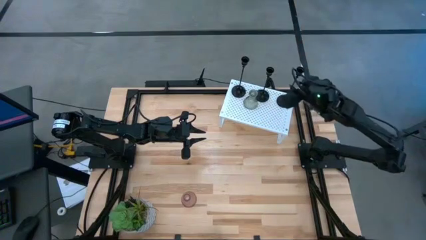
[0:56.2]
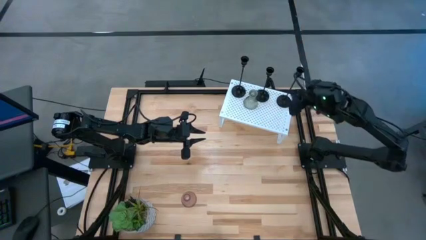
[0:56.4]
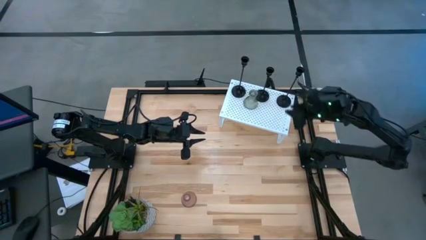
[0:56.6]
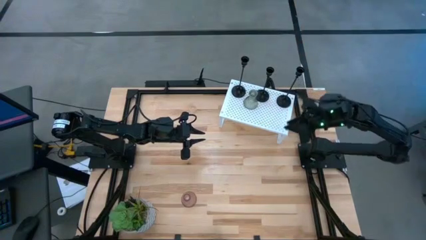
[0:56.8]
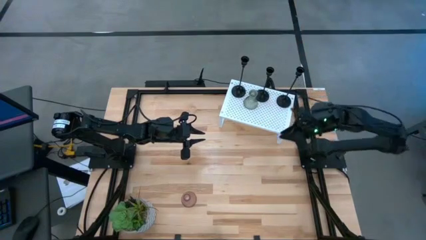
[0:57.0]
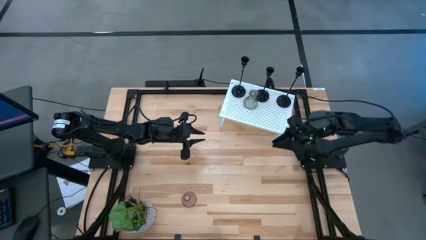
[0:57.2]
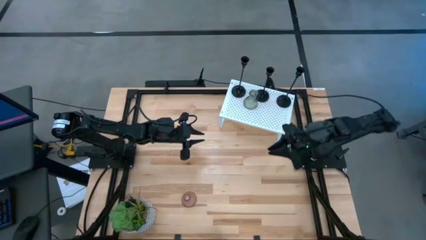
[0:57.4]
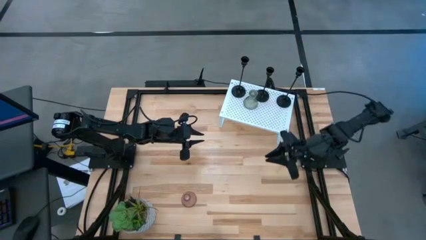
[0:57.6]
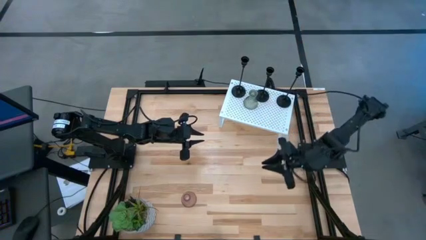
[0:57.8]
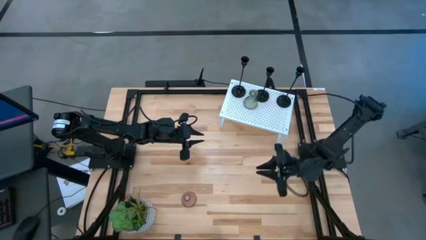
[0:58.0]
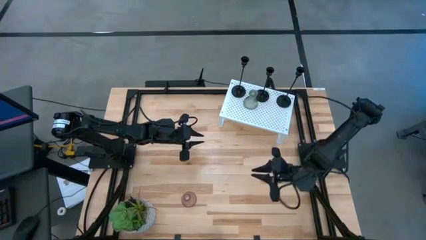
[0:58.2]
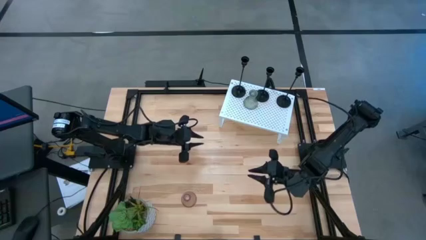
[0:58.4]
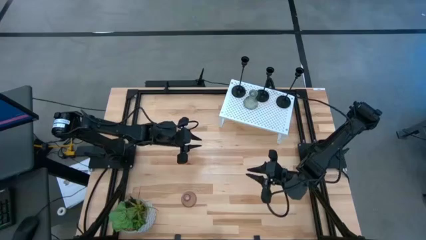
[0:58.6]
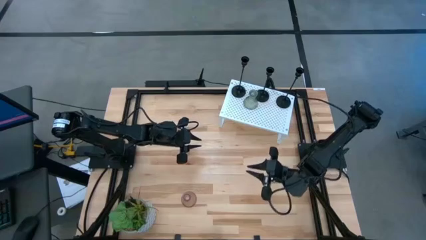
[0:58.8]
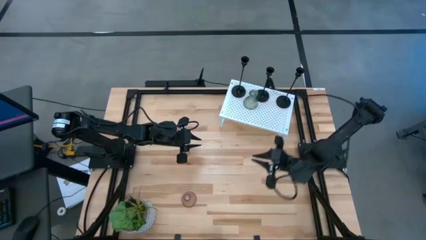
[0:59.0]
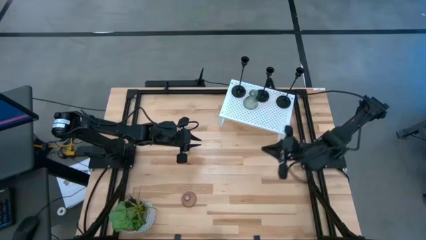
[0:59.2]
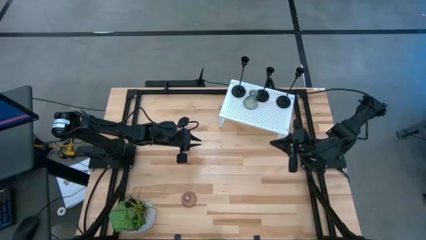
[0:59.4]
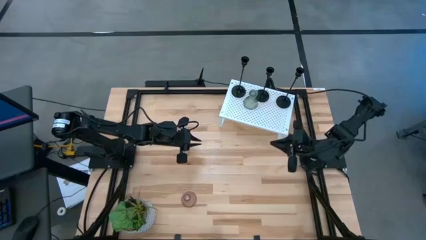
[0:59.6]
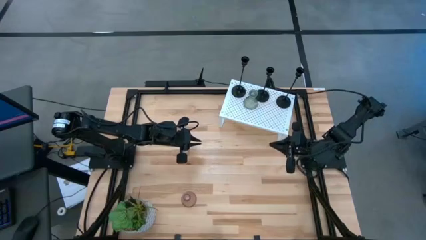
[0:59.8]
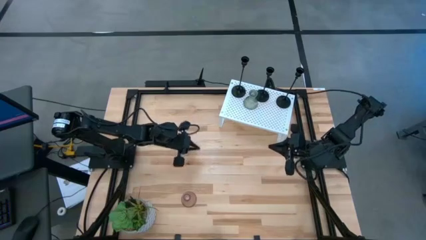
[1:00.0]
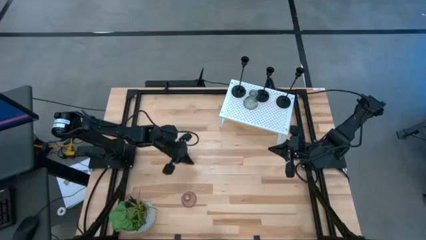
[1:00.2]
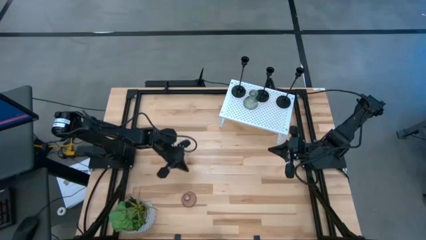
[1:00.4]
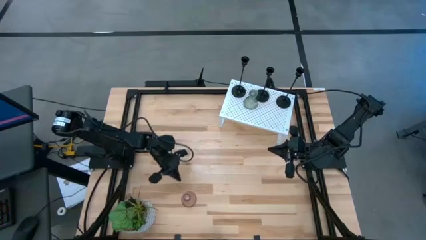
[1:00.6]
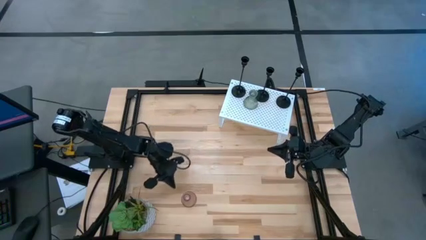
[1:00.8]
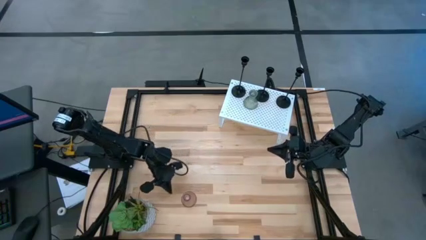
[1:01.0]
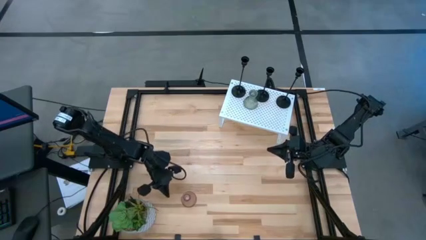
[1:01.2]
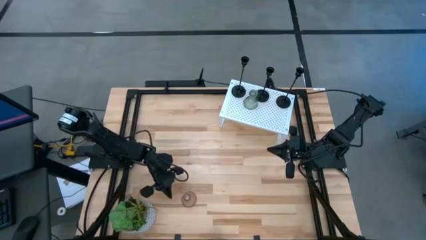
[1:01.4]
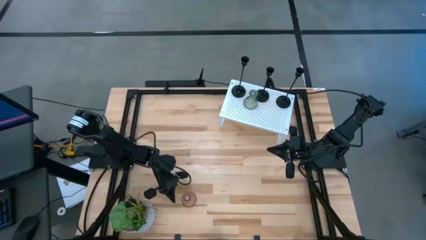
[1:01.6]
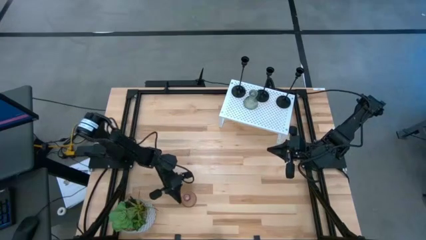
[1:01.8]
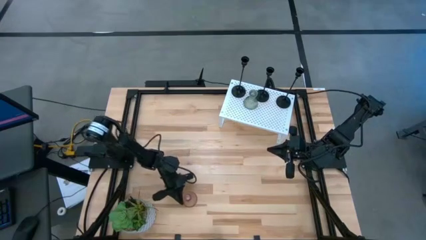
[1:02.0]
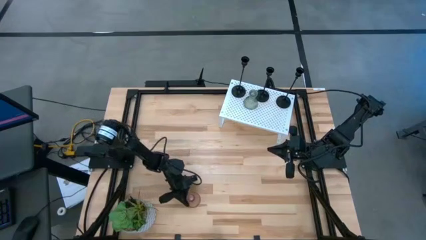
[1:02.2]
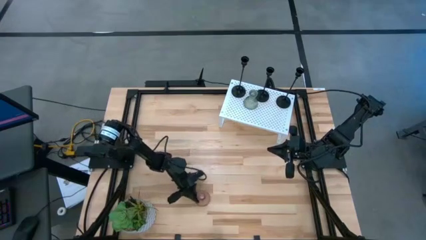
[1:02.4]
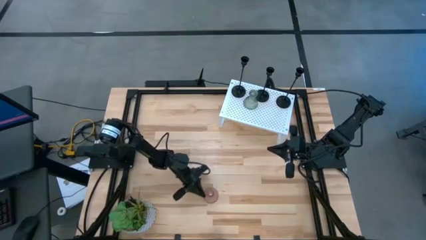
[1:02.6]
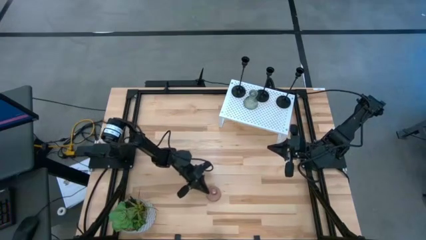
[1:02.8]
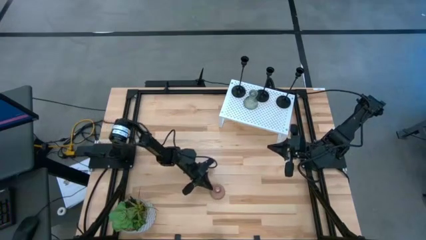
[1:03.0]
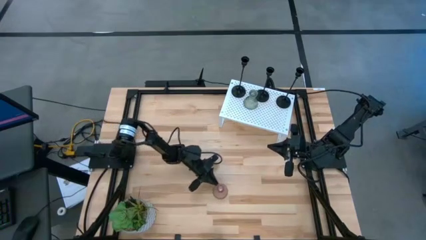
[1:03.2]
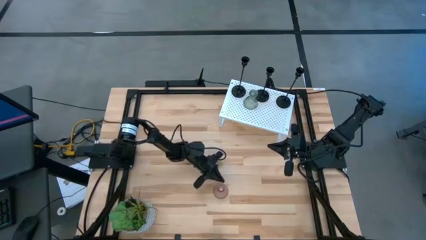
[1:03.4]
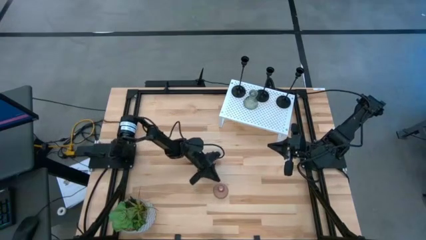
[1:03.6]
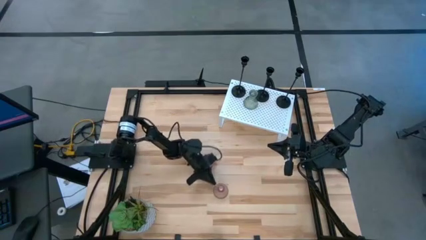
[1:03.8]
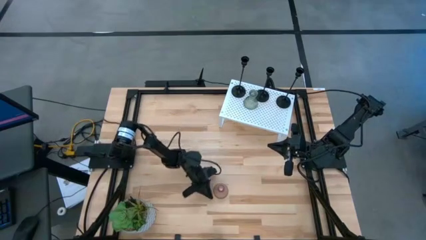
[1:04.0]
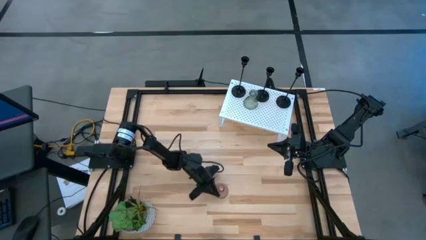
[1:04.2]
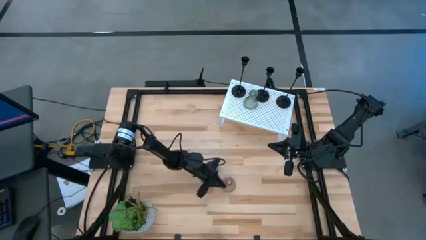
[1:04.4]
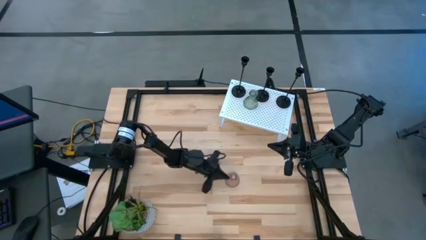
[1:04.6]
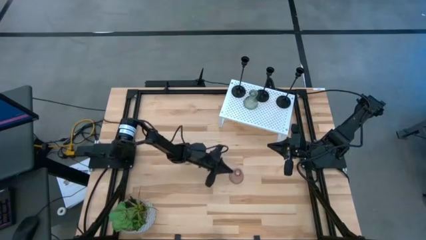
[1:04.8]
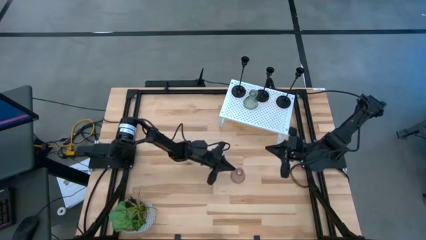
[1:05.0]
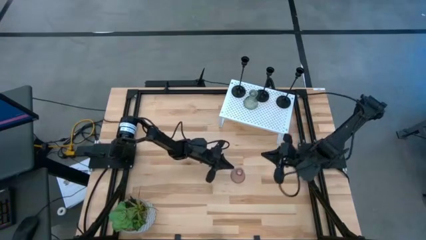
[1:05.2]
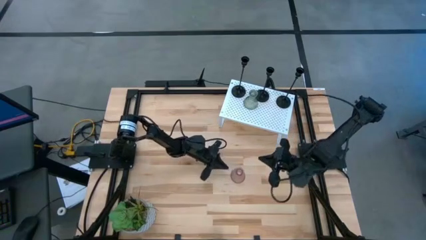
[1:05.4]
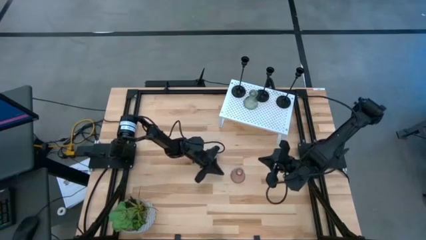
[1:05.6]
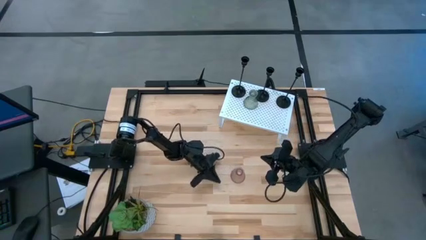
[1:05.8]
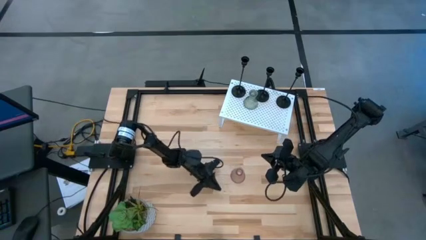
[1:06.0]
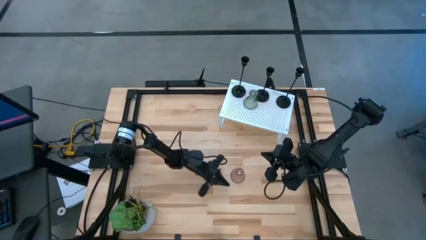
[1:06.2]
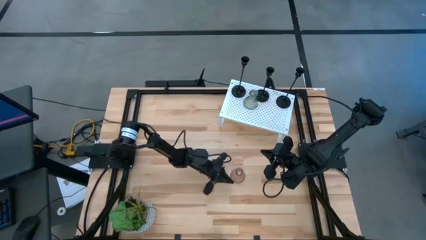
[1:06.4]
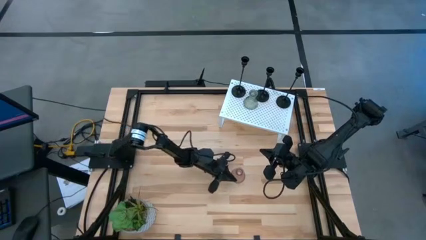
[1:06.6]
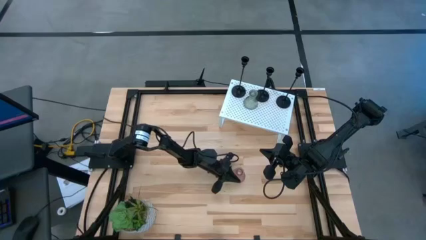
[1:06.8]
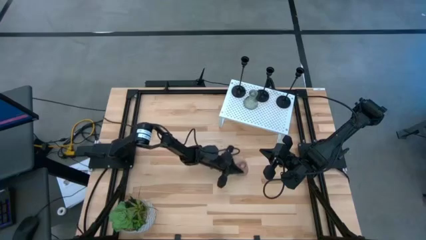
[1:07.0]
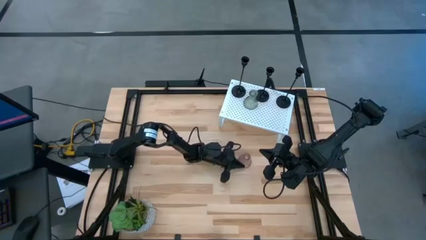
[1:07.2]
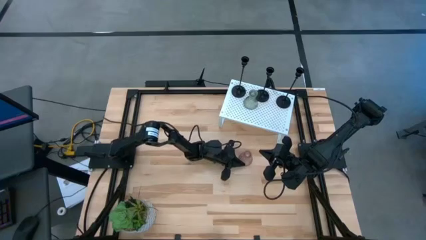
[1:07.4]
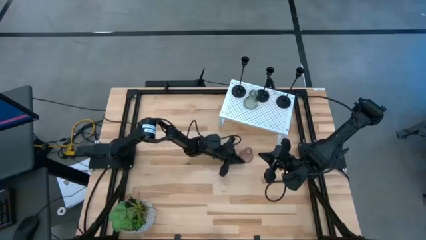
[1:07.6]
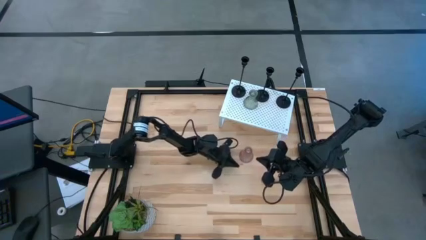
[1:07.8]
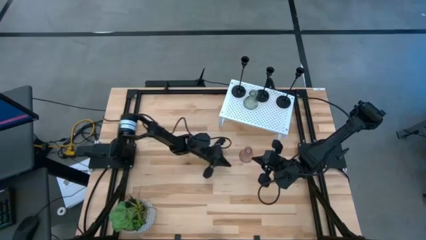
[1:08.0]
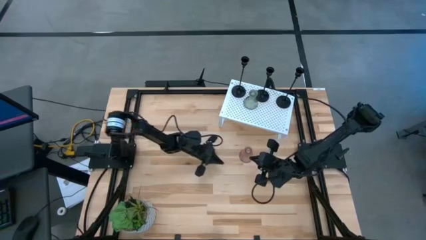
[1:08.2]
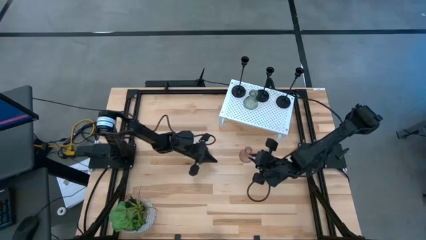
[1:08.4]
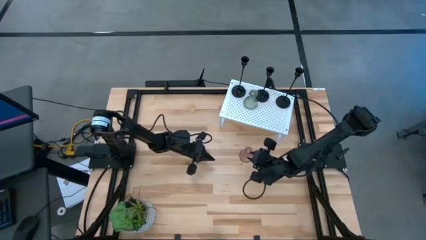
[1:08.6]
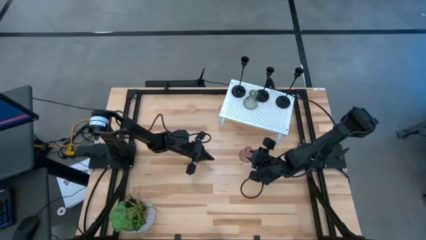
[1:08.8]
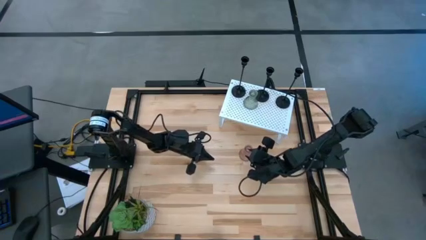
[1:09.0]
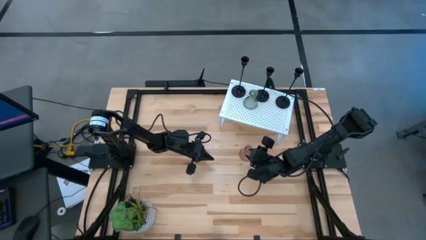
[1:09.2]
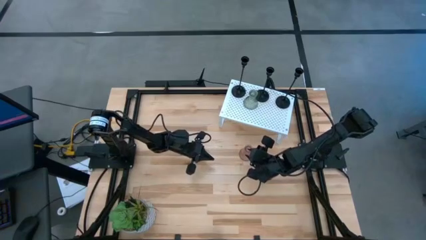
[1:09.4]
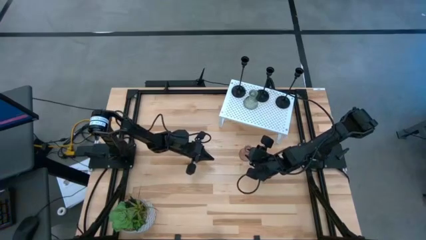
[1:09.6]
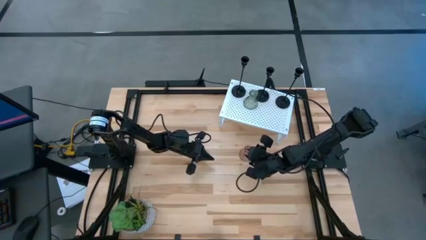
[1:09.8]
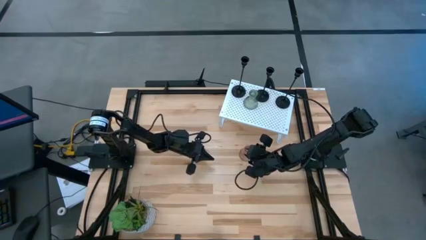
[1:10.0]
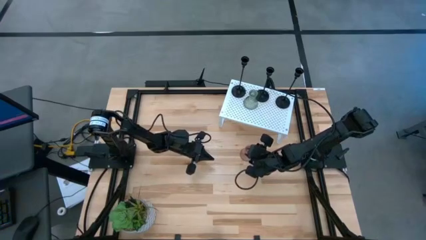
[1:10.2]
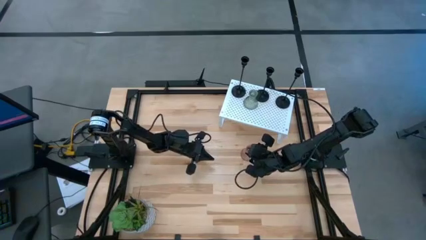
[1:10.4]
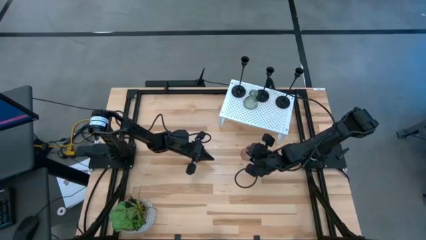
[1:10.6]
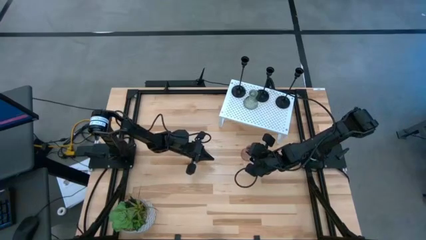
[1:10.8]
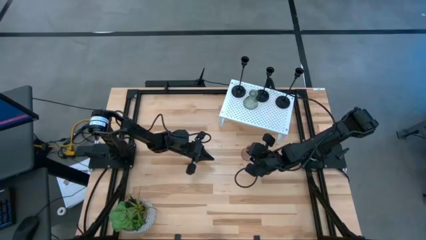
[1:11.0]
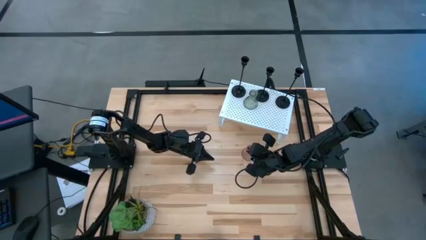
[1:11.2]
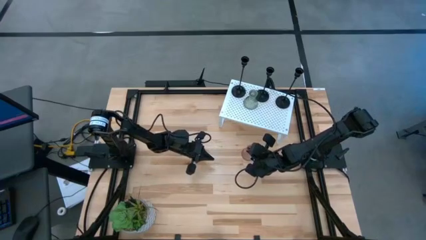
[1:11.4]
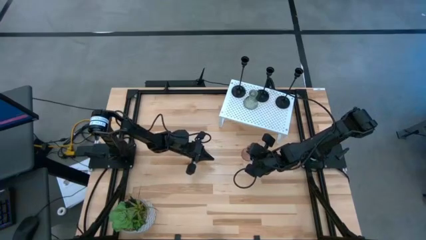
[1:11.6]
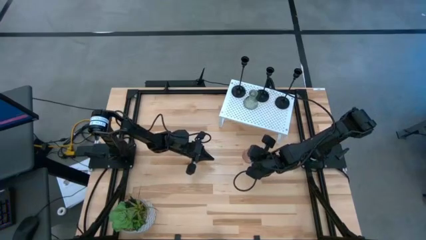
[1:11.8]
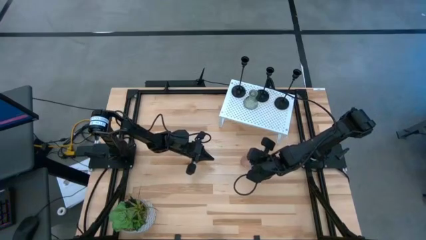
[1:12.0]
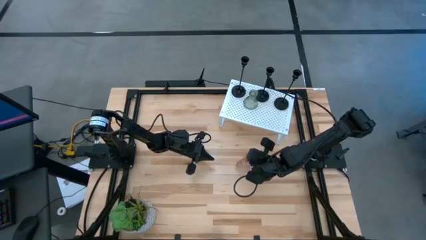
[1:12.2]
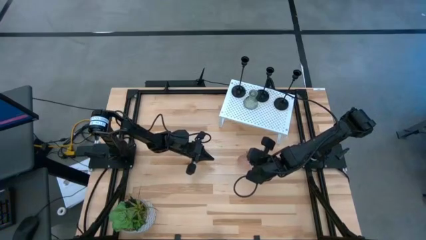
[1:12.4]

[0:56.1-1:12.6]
Task: Pick & Place candle stick holders
Put the pink candle holder on the shelf
